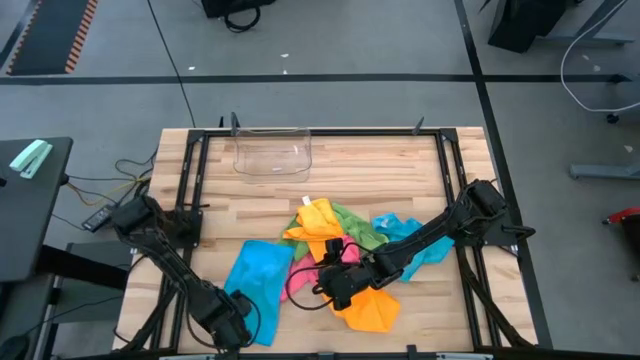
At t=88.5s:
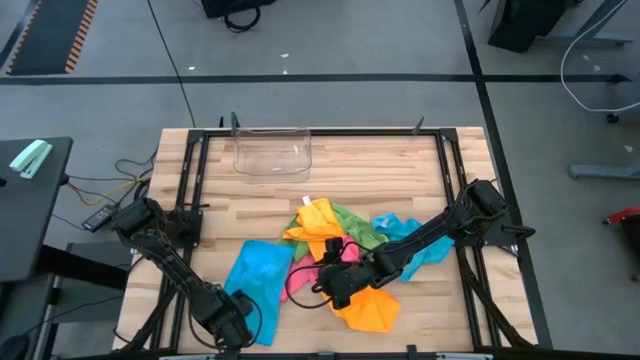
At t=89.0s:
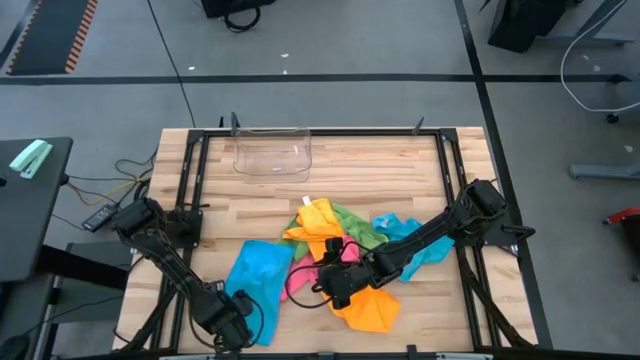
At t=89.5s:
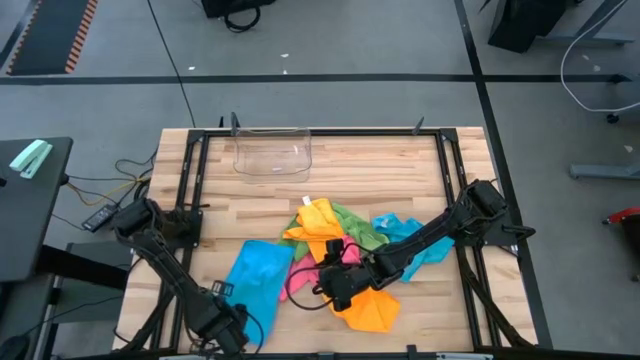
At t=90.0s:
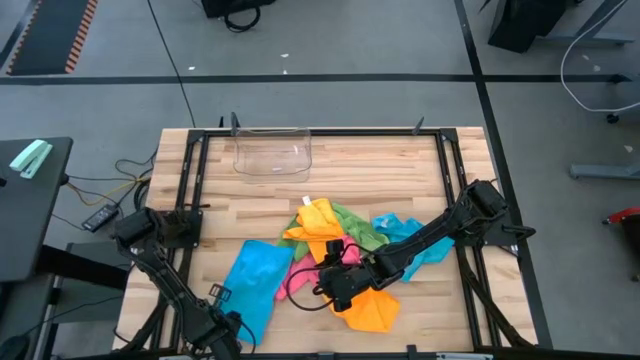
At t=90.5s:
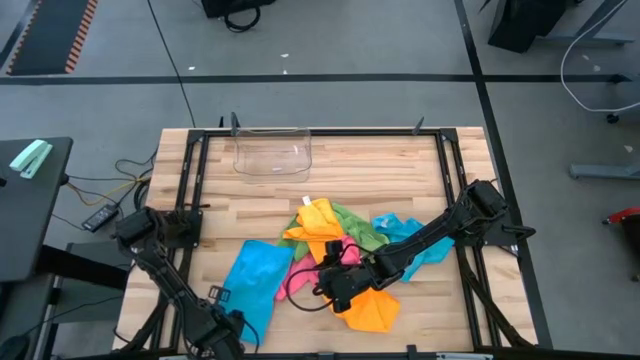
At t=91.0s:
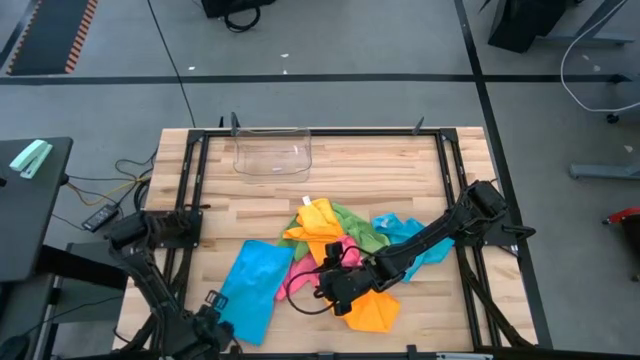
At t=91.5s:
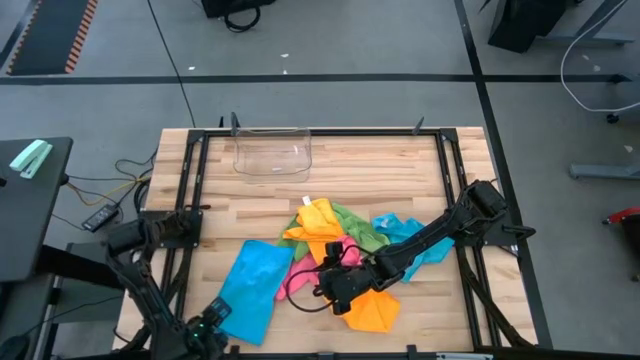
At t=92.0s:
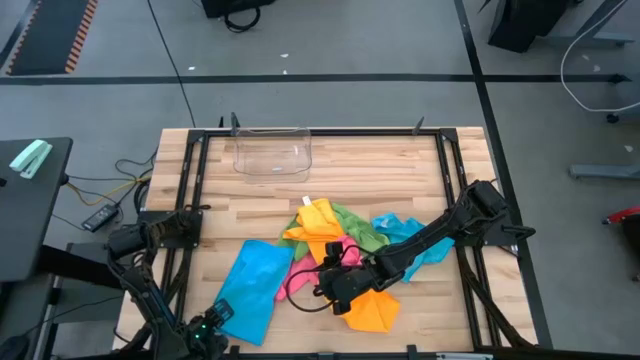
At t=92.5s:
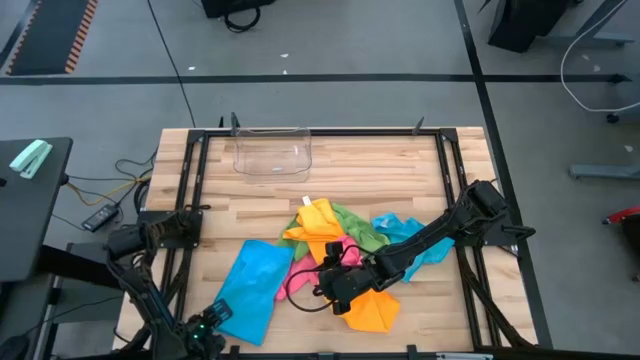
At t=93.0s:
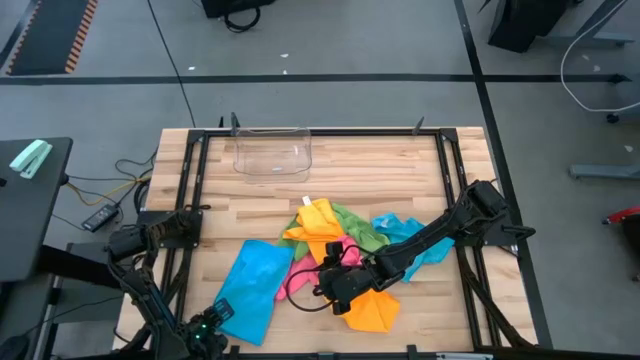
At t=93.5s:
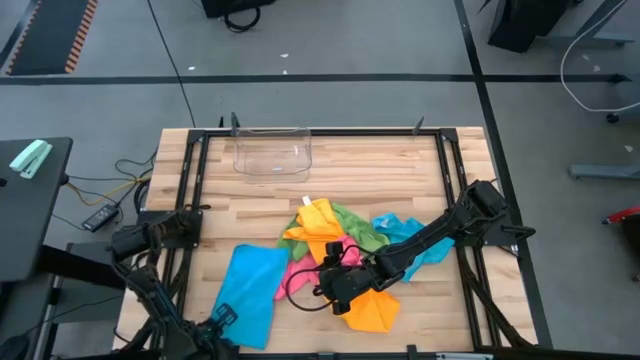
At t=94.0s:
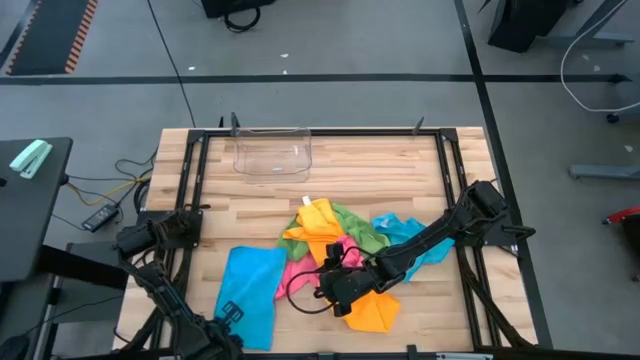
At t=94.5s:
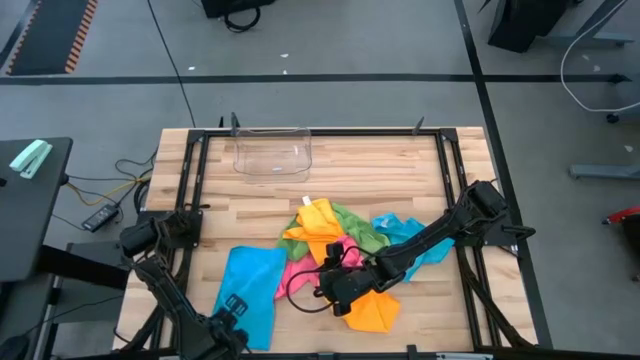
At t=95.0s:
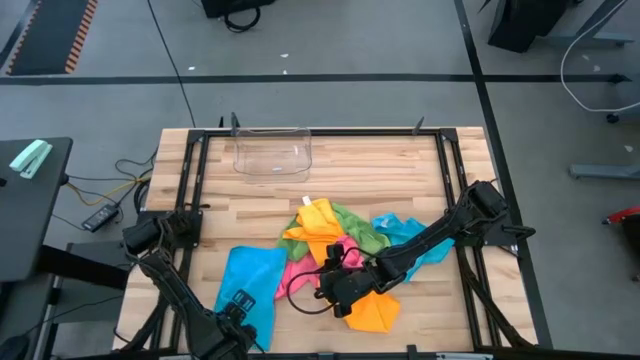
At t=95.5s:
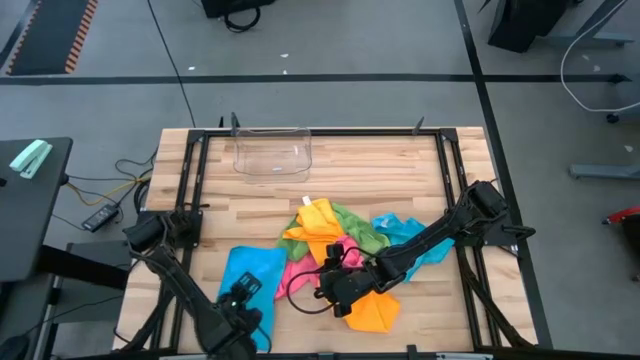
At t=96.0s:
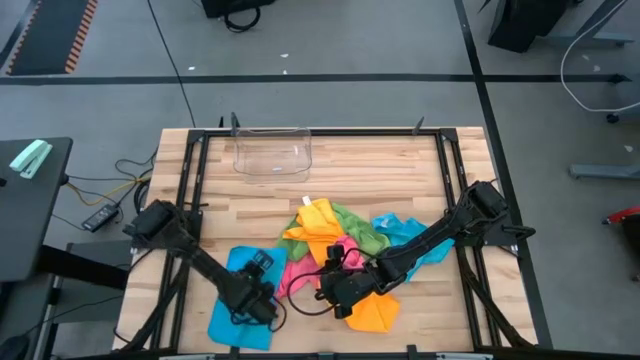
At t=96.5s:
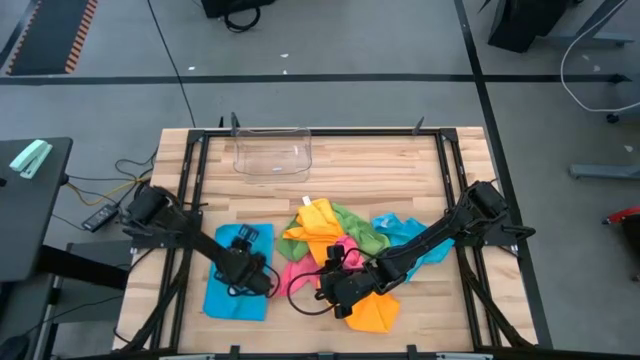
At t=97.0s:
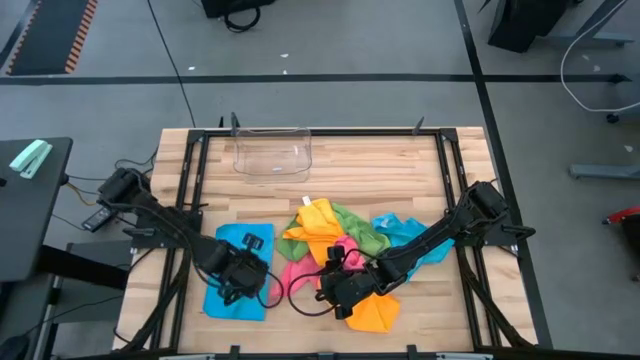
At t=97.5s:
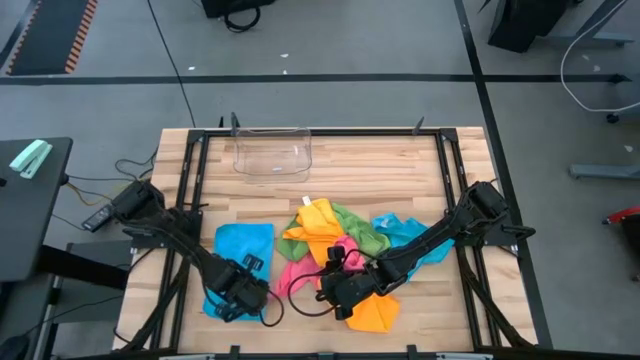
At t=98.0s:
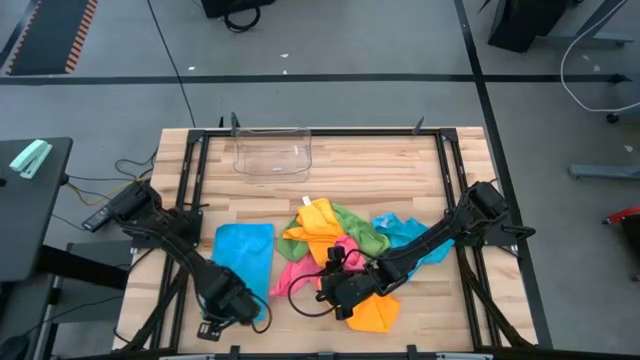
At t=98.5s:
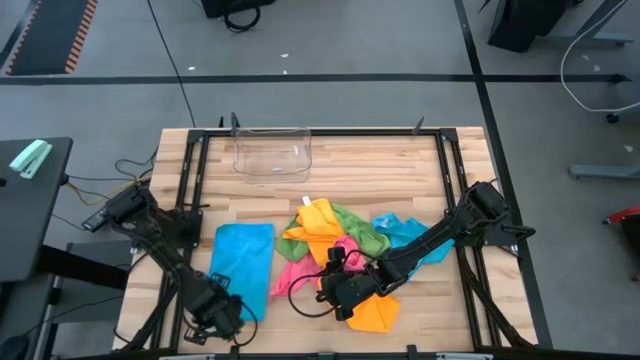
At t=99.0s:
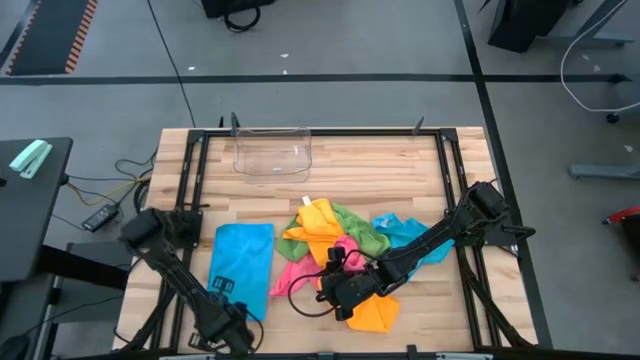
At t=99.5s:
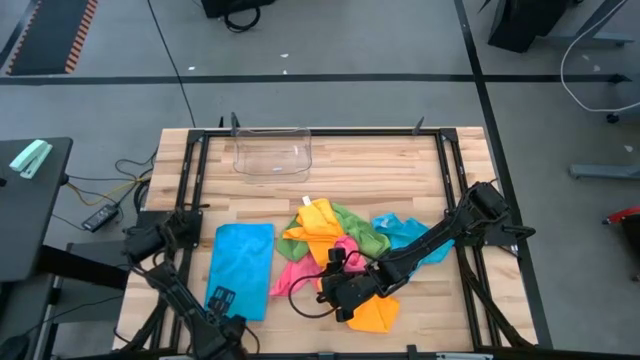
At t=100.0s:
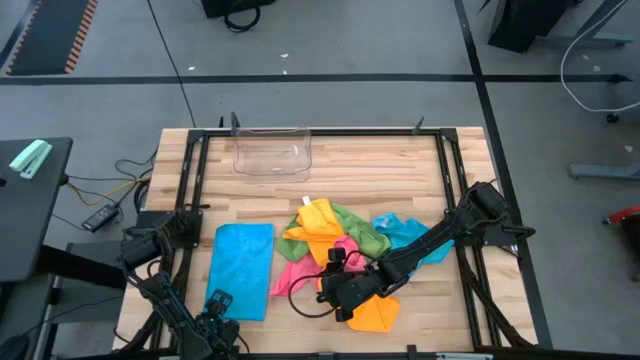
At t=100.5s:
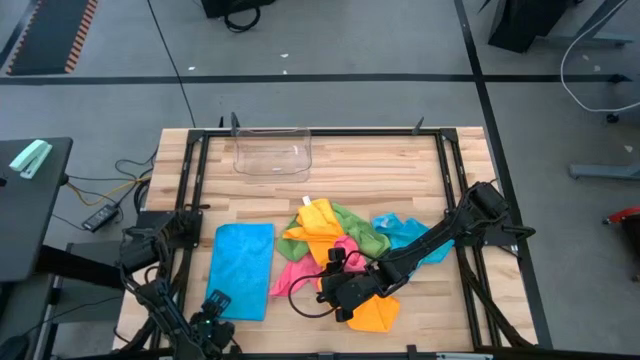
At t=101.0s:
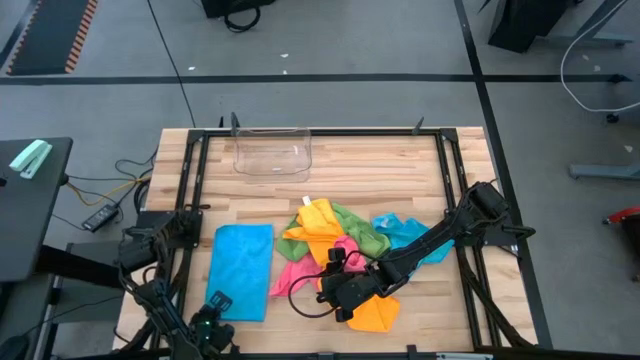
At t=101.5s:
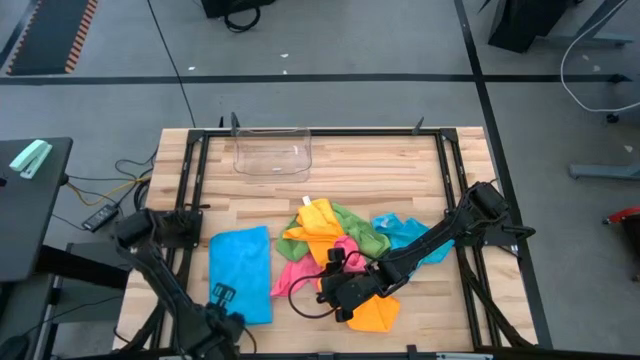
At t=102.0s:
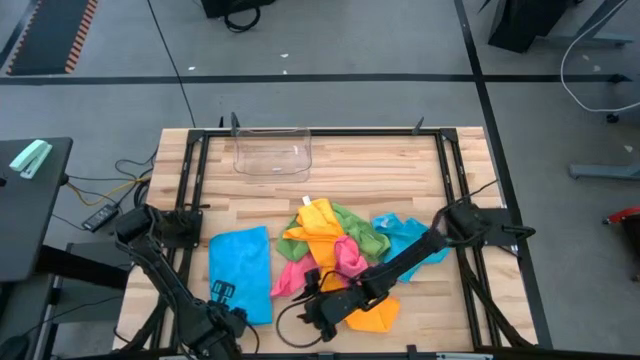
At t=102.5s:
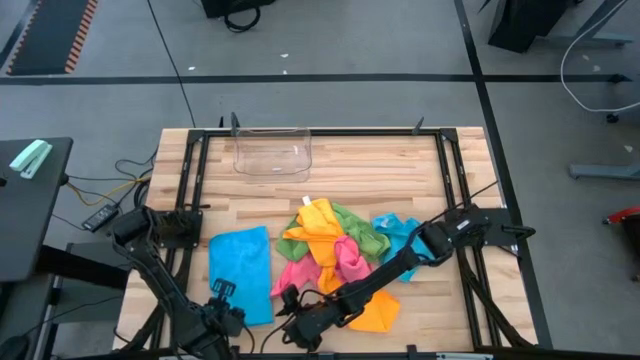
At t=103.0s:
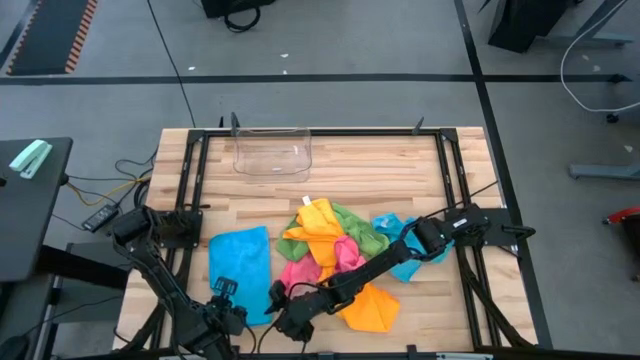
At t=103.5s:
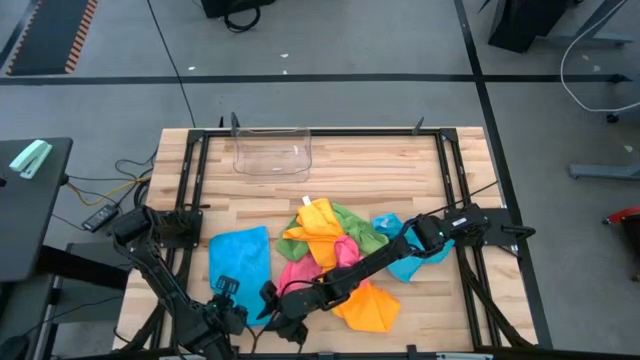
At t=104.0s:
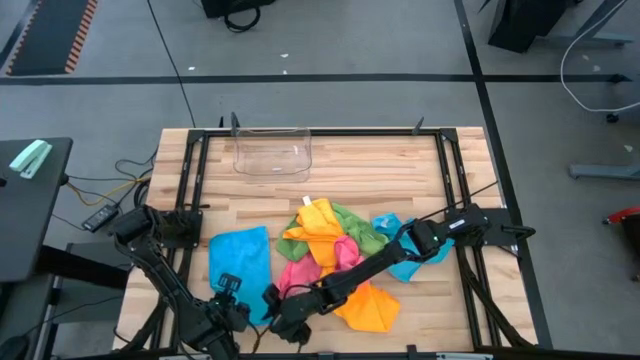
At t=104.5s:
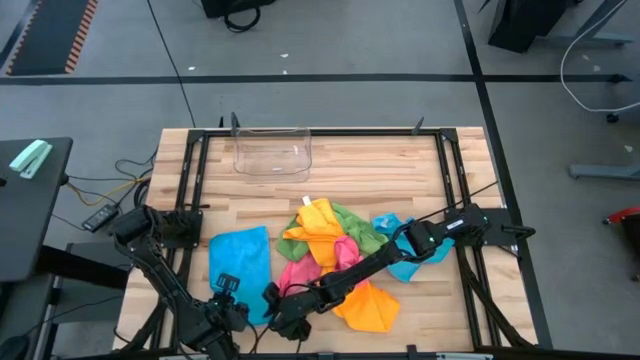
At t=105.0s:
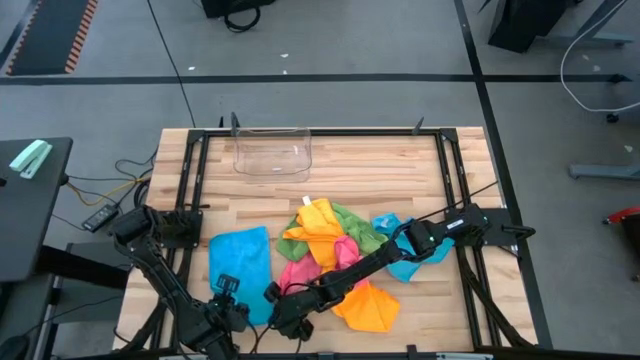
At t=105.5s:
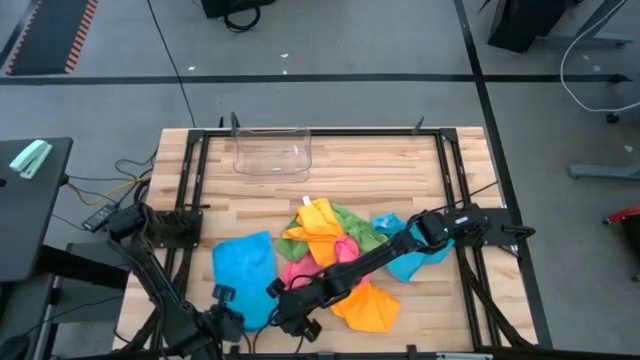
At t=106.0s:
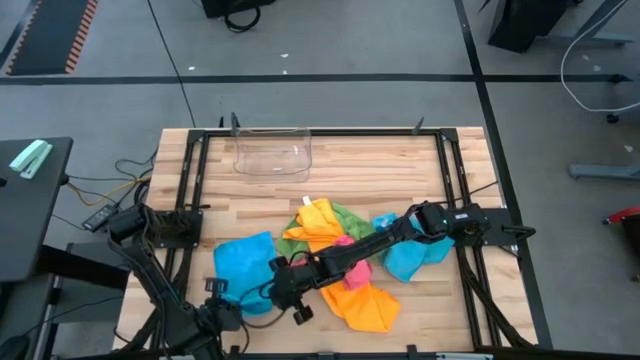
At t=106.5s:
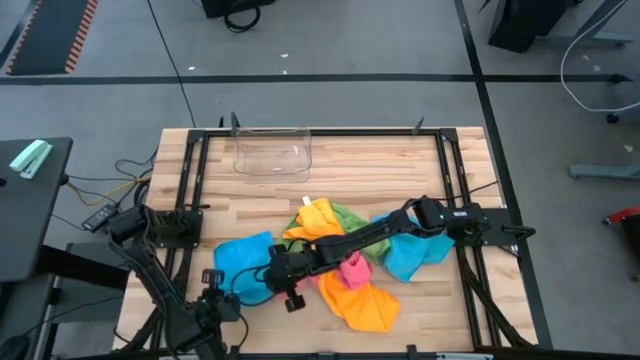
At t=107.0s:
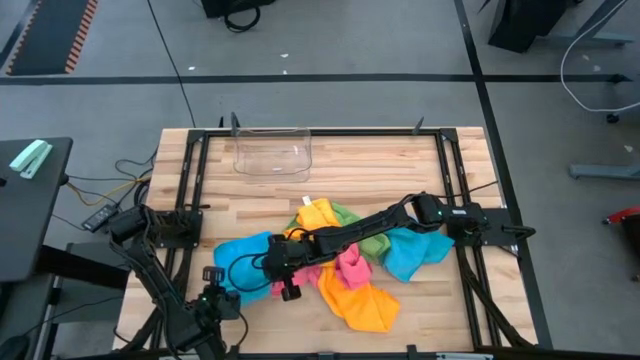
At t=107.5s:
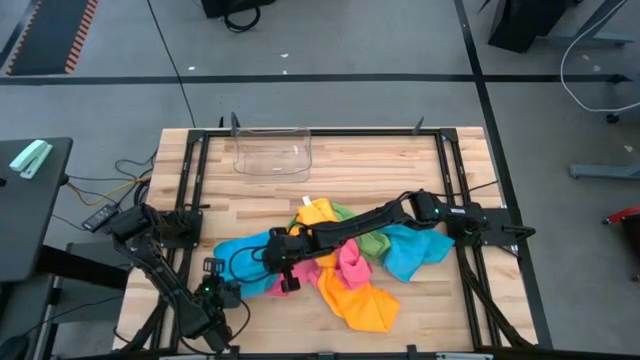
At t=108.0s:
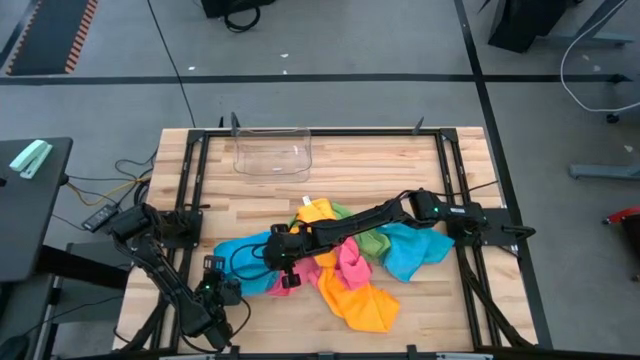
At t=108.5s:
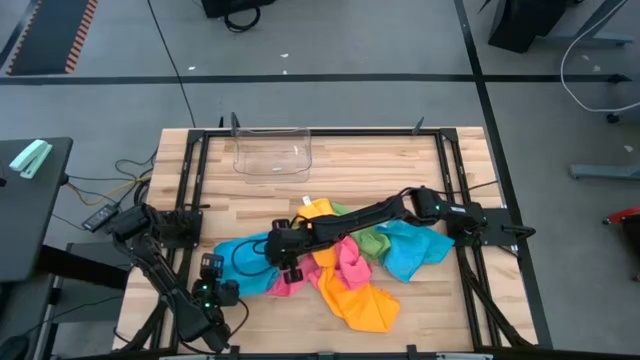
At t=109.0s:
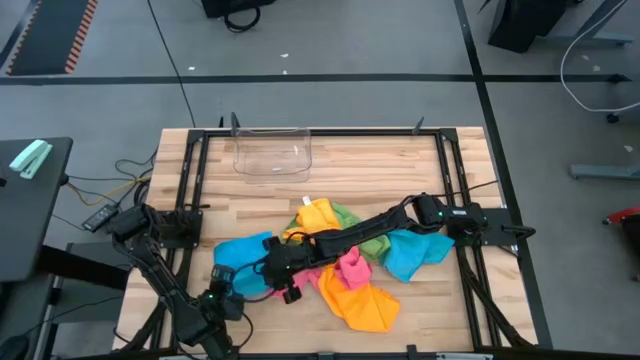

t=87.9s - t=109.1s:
Task: Fold microfiber towels
Fold the left blue microfiber towel

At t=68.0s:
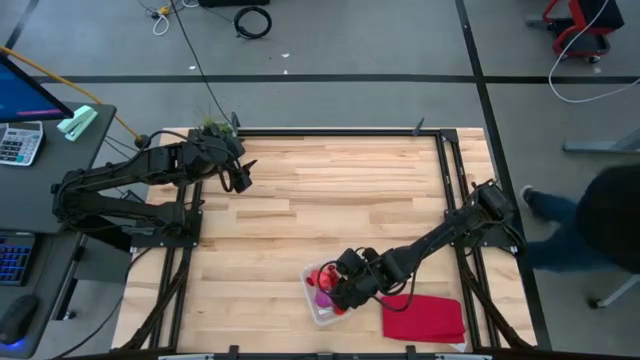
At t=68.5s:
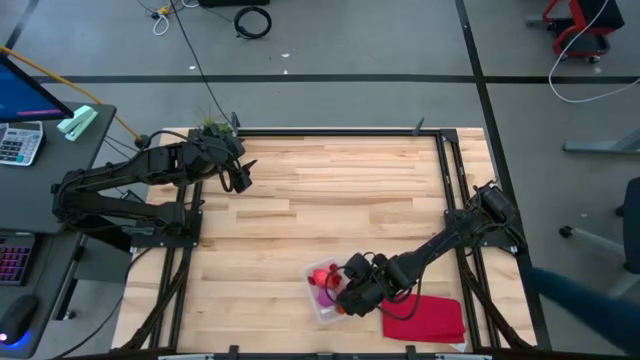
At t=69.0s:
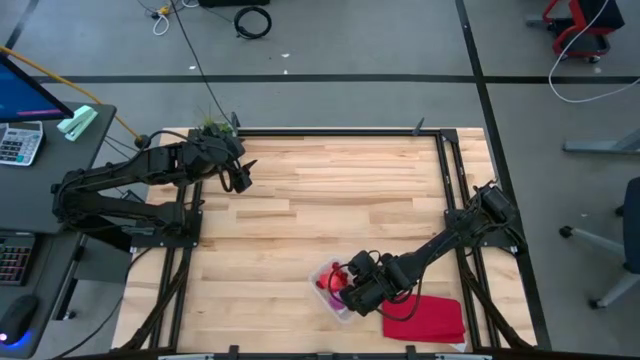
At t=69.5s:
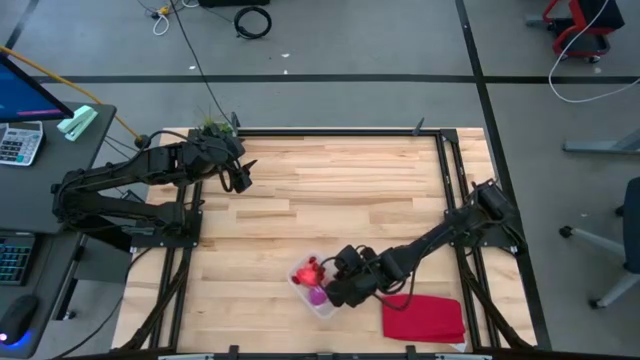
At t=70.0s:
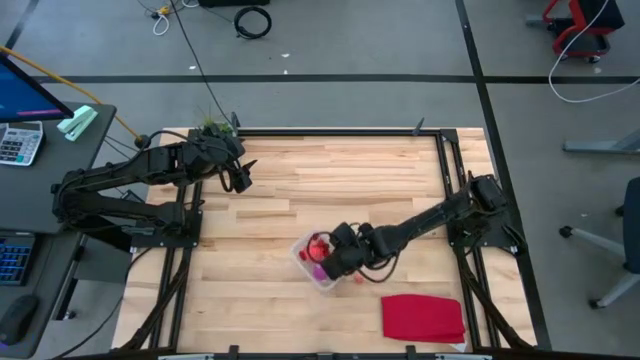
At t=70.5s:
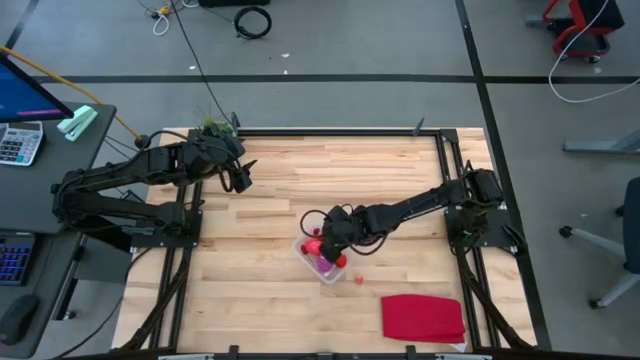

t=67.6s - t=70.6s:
Task: Pick and placing Produce into tupperware
Adjust the transparent bin
